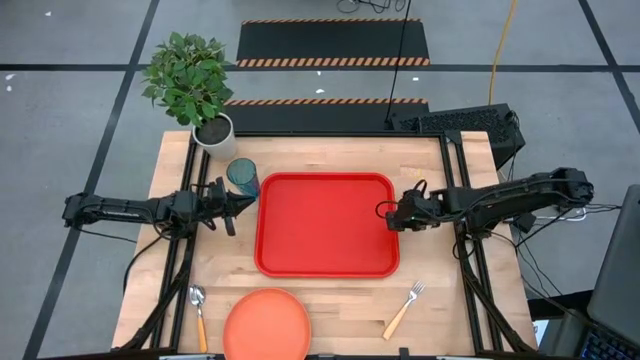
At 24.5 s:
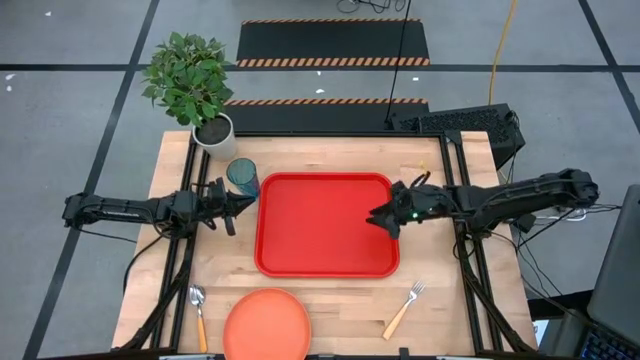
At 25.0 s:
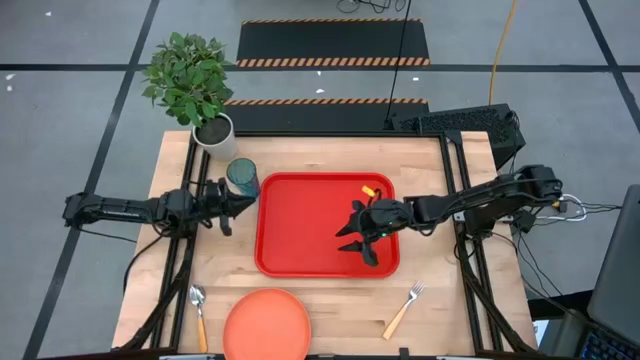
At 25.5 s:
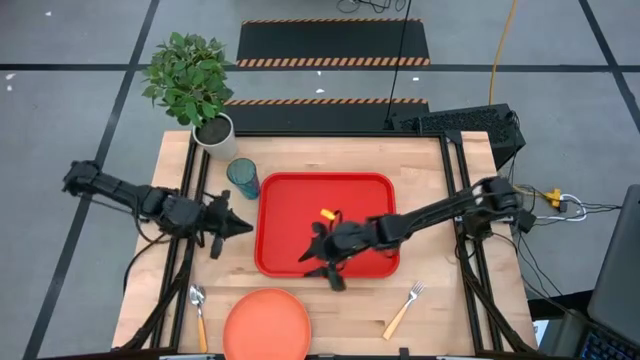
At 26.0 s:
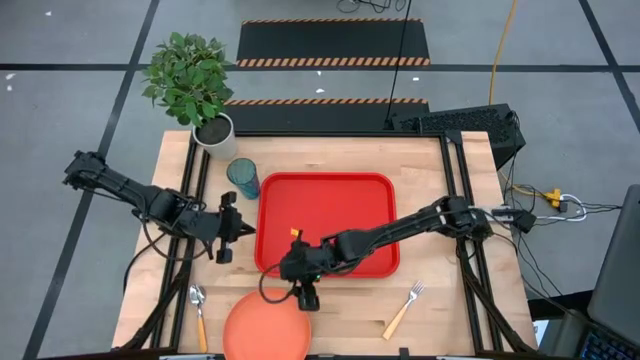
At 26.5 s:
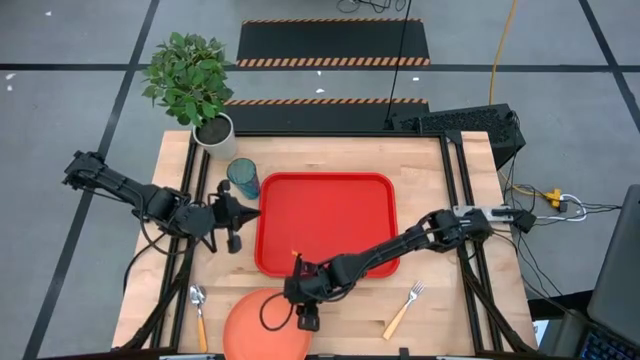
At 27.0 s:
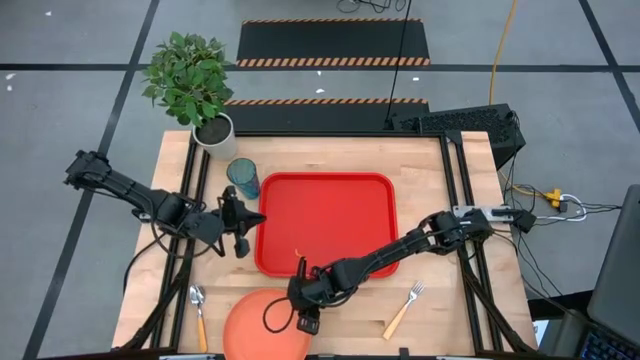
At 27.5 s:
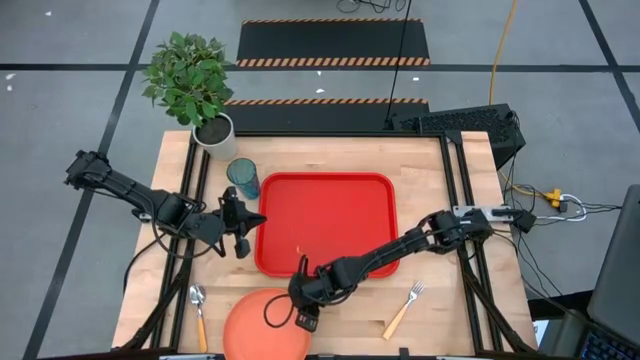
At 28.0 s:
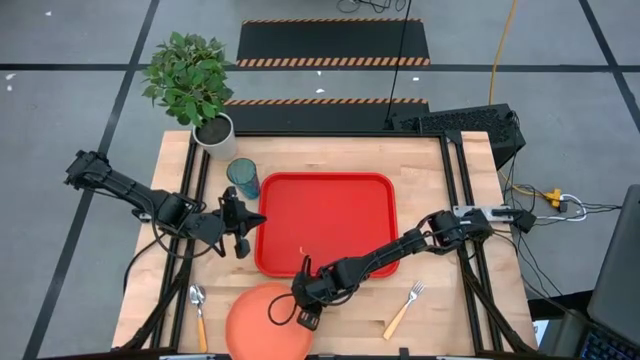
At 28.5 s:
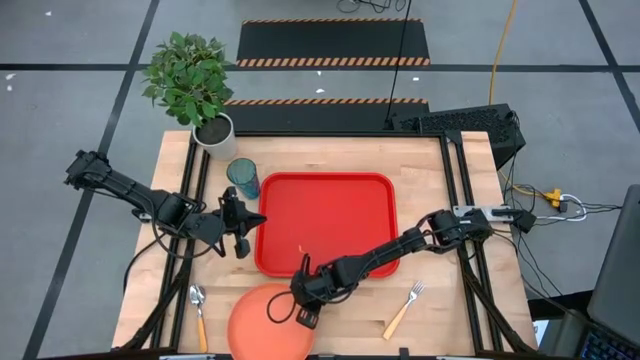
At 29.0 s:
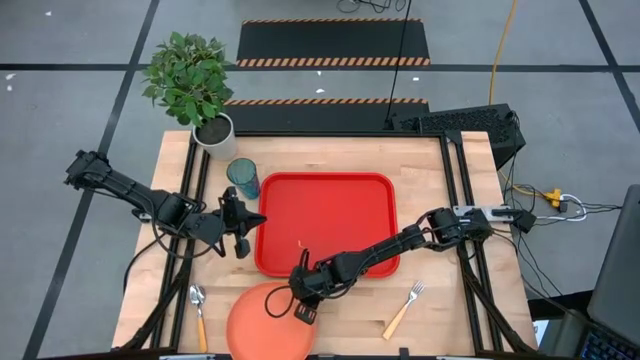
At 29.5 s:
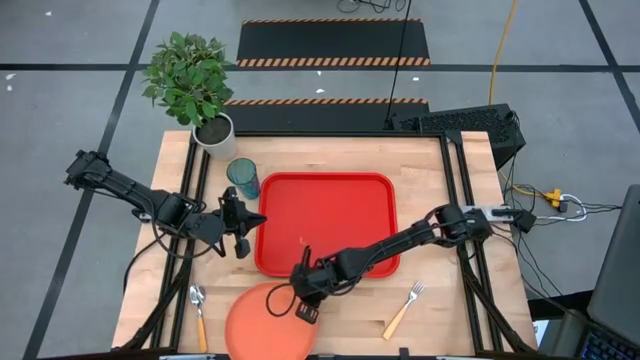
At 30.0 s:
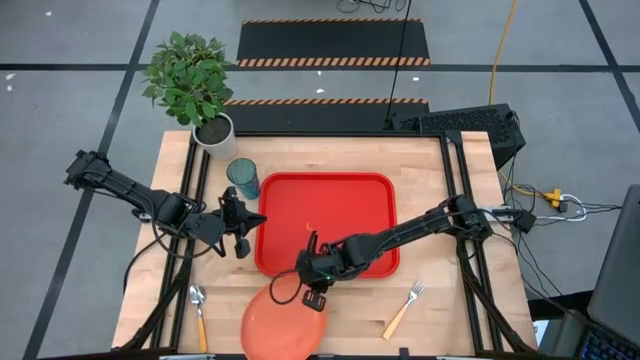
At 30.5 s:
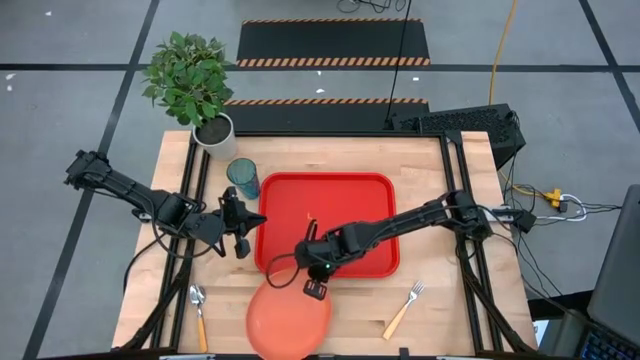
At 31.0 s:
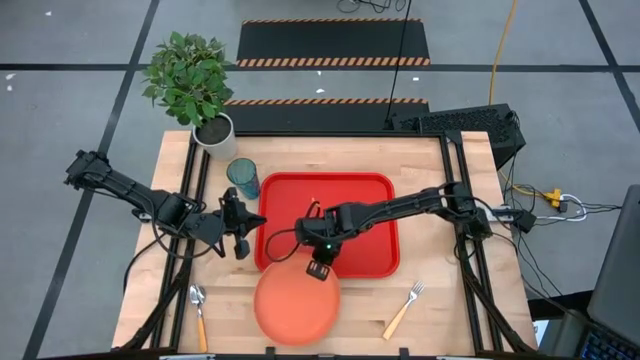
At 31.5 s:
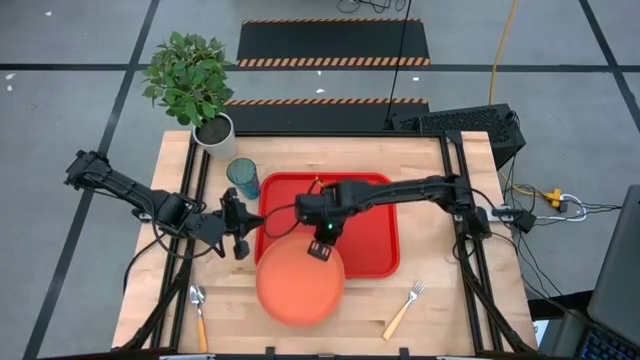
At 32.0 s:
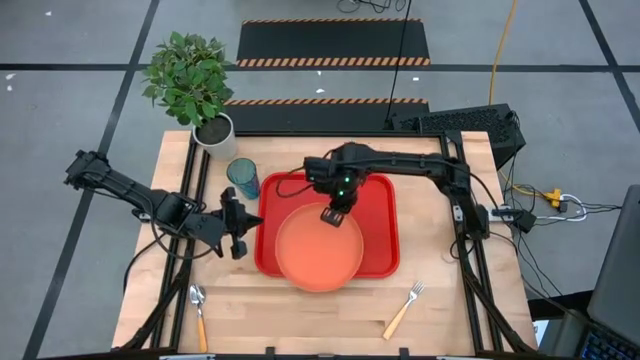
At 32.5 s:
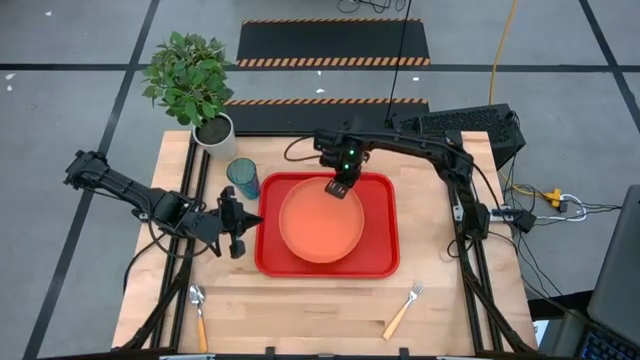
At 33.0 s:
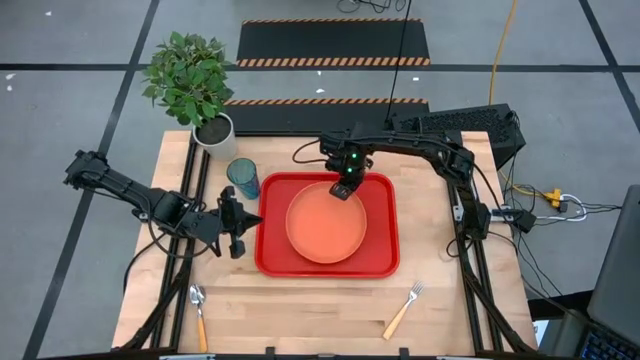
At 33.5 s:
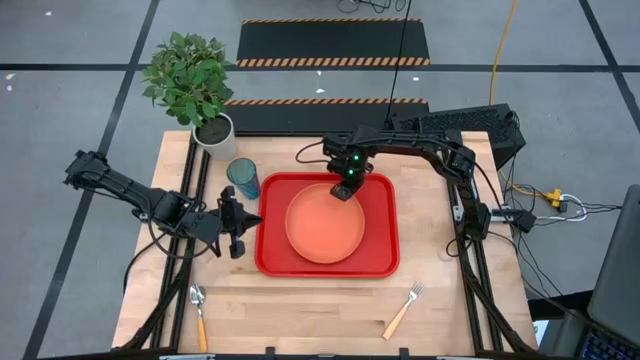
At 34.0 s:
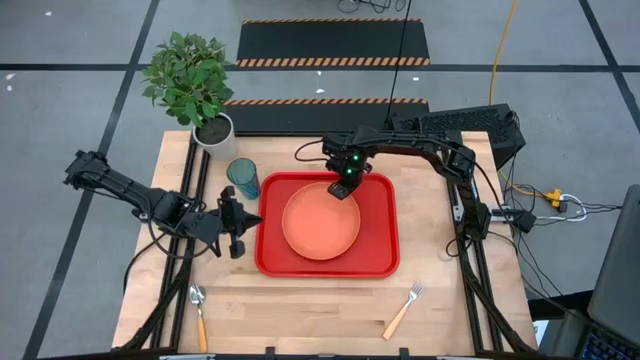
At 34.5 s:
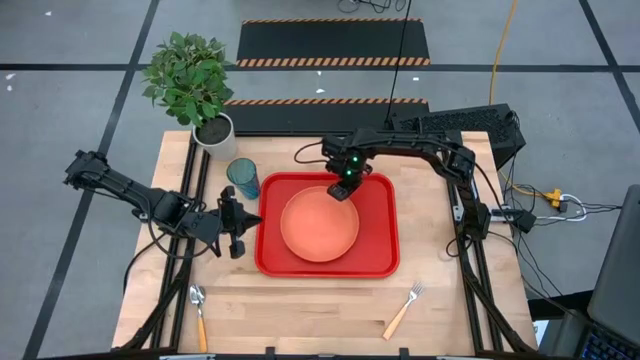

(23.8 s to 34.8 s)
Task: Pick and place plate/cup/fork/spoon on tray
Put the orange plate on the red serving tray

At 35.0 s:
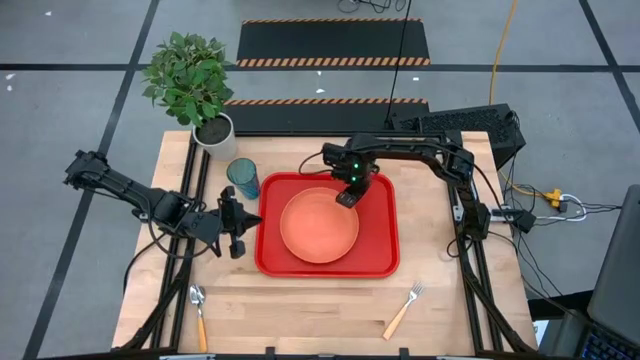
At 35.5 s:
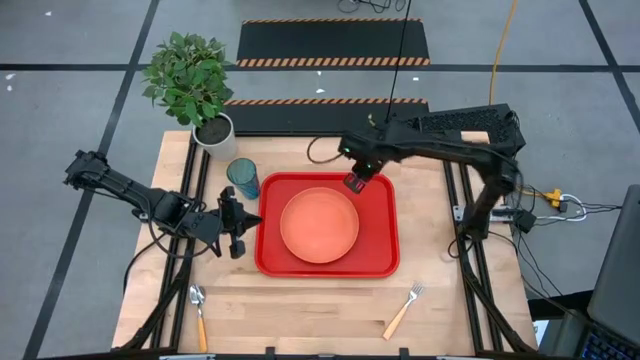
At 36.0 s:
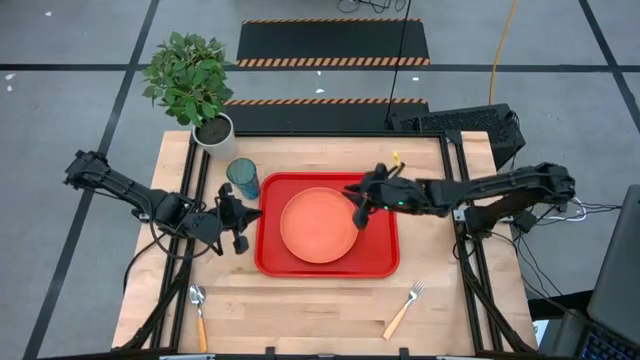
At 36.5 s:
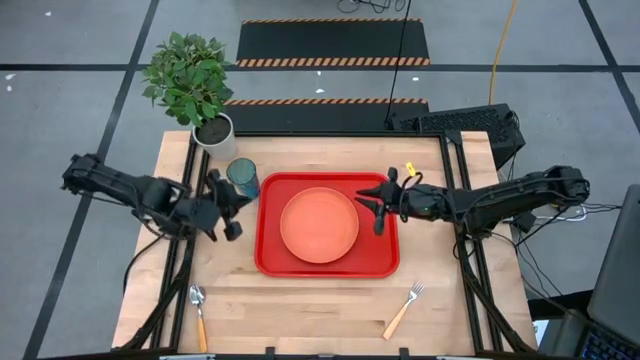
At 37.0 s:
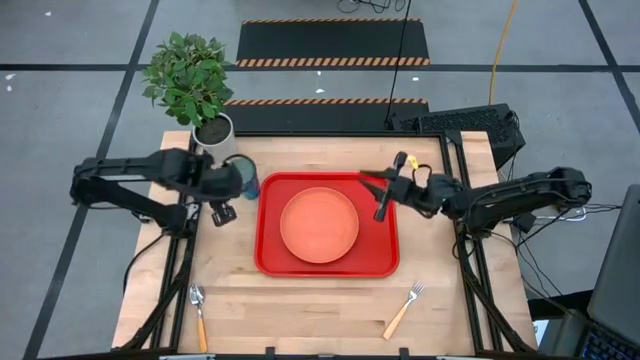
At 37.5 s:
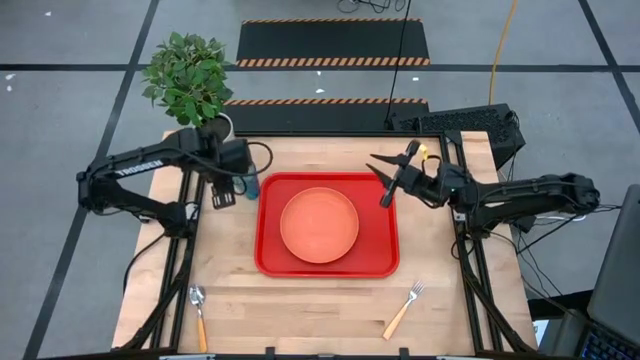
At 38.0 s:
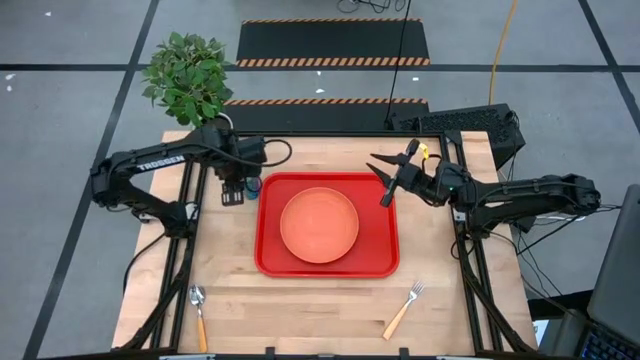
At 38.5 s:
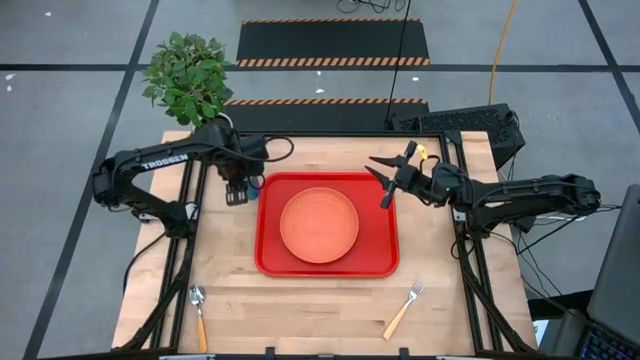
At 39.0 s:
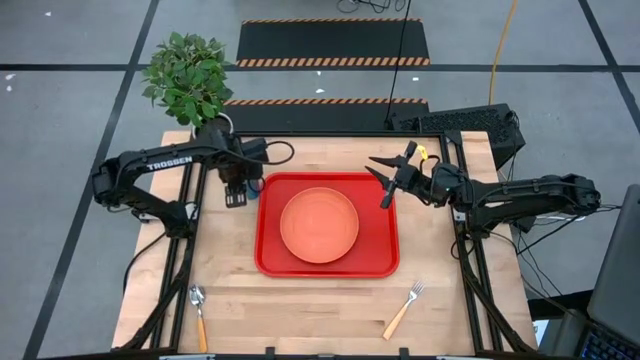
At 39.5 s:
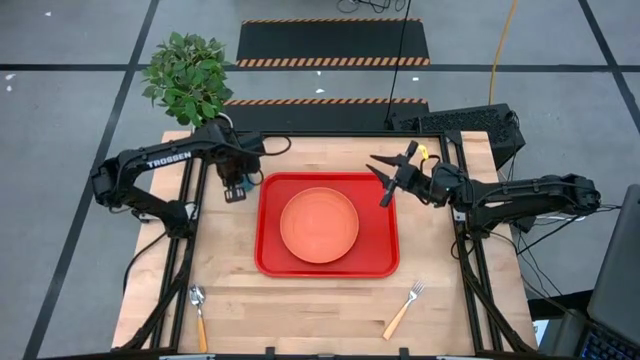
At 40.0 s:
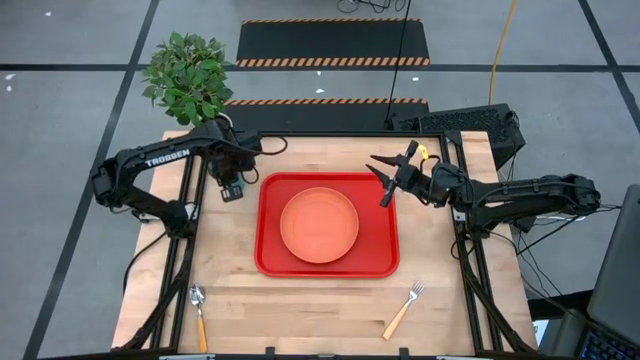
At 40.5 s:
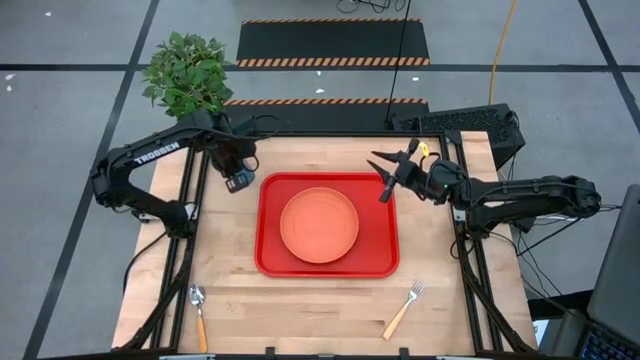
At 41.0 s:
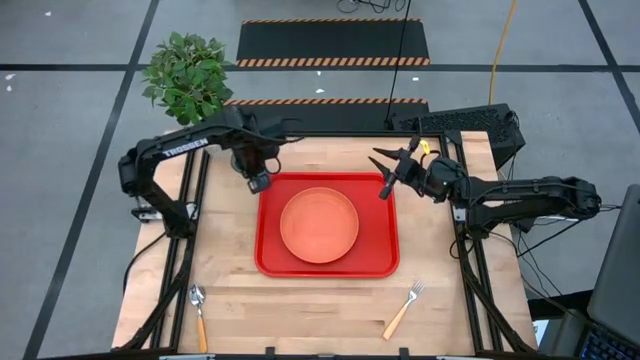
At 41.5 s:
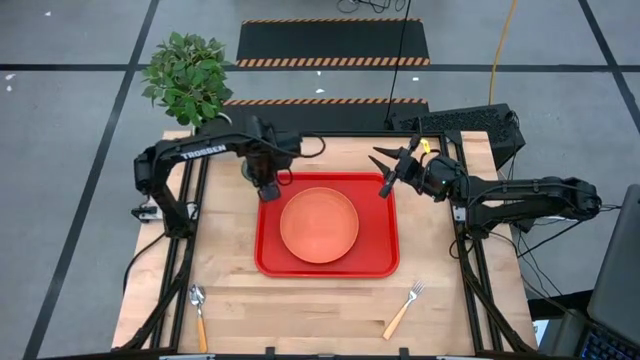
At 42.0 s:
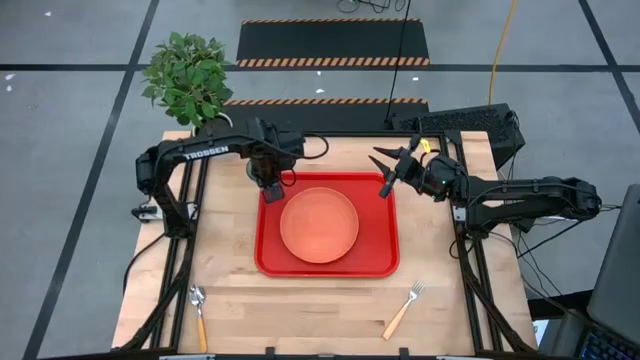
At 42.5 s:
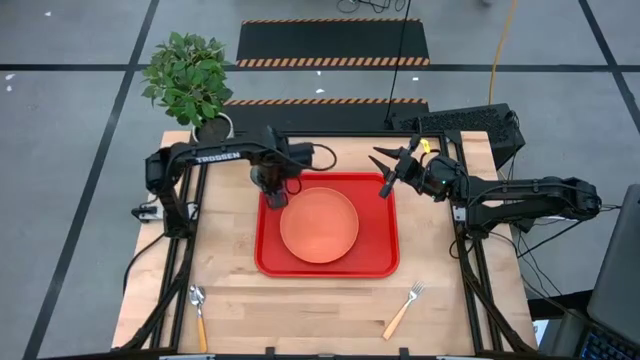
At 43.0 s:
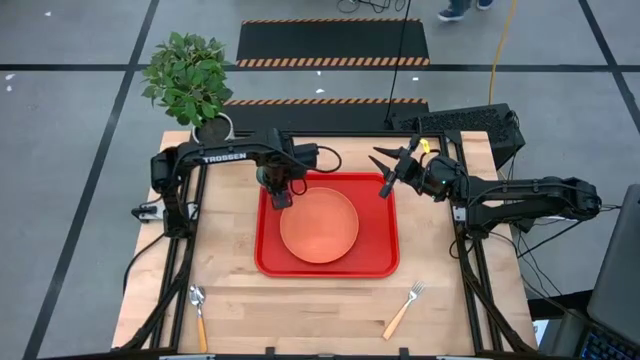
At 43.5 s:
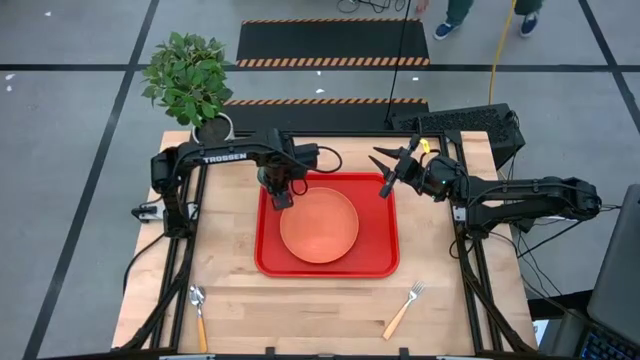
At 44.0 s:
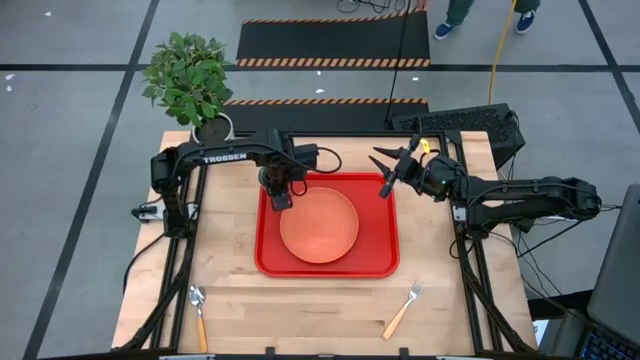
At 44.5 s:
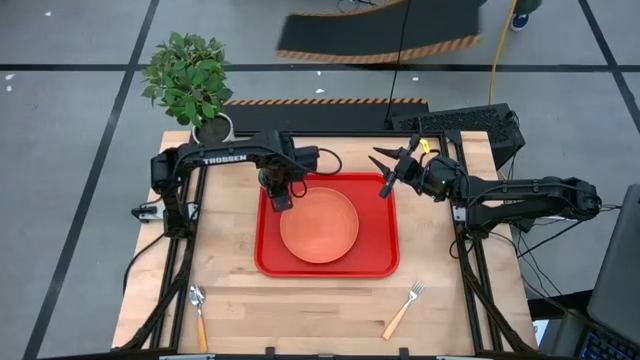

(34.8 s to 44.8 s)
Put the blue cup on the red serving tray to the top left of the orange plate

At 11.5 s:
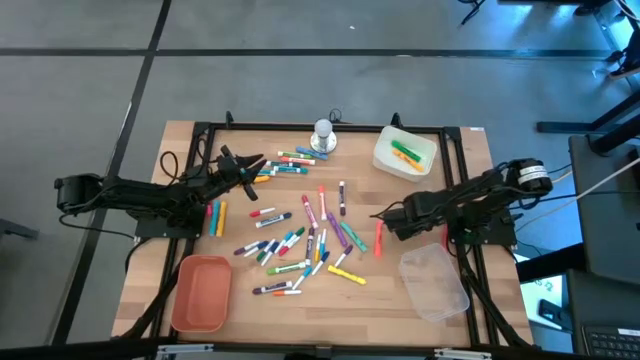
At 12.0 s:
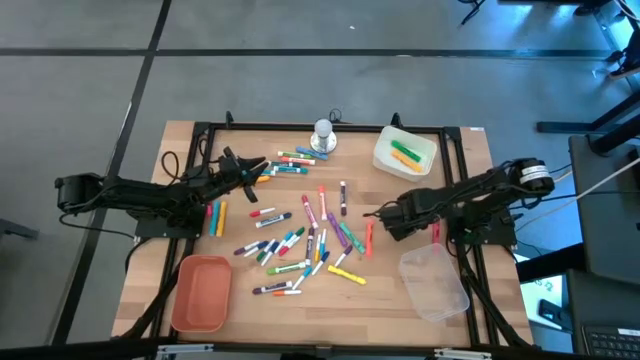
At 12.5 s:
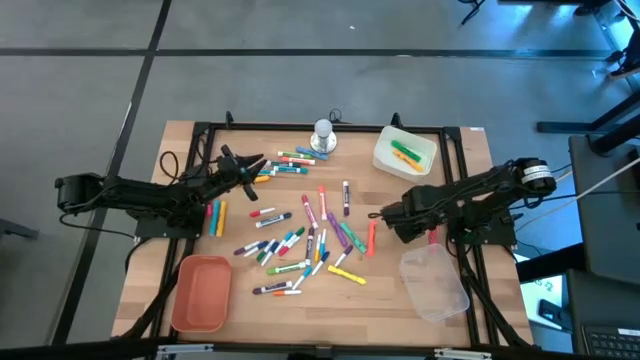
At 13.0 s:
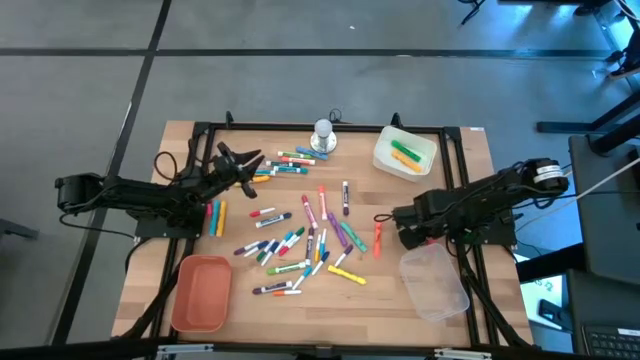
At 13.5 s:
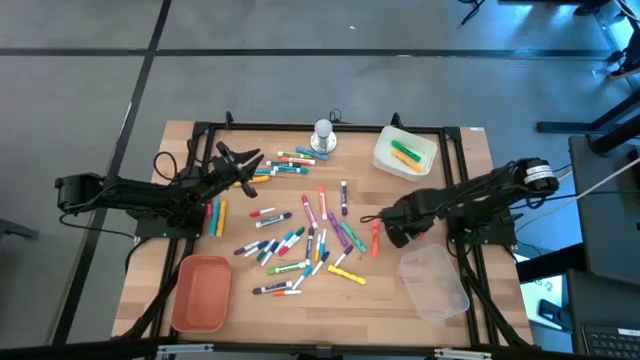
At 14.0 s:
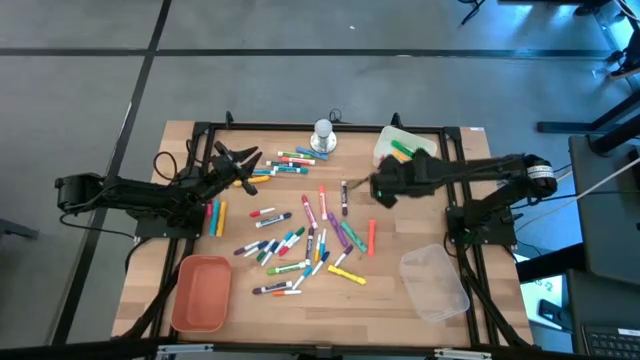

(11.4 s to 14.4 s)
Task: Pick & Place Markers
Put the large pink highlighter pen into the white bin
